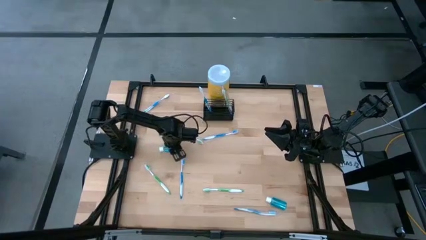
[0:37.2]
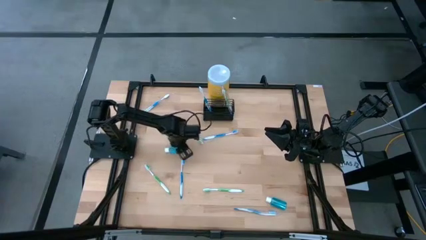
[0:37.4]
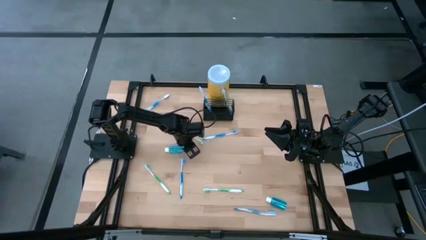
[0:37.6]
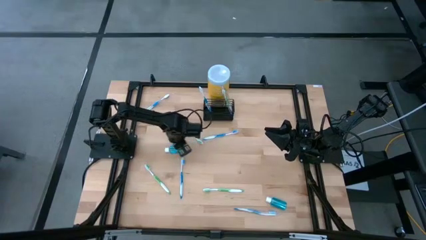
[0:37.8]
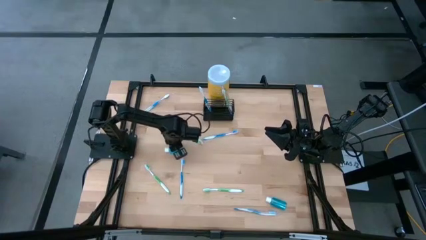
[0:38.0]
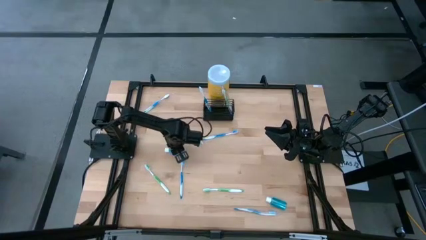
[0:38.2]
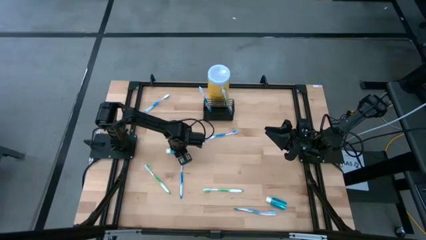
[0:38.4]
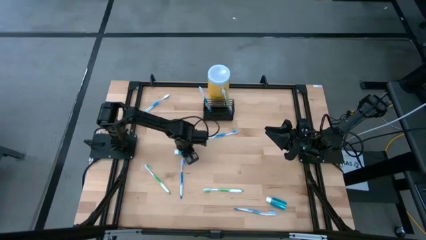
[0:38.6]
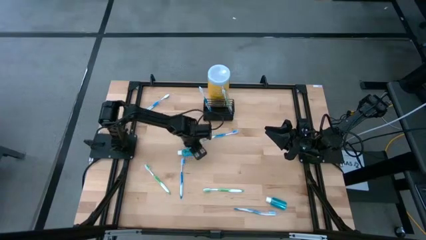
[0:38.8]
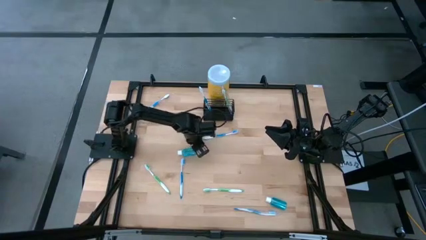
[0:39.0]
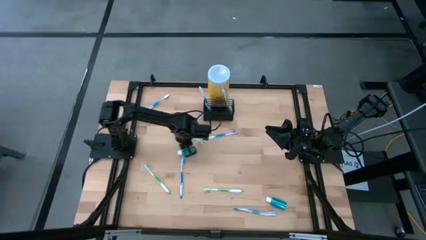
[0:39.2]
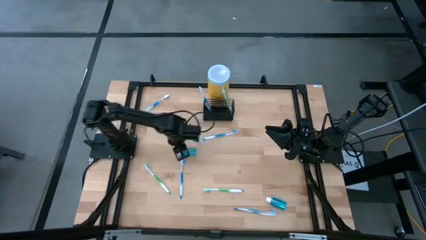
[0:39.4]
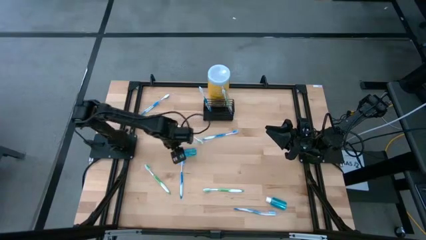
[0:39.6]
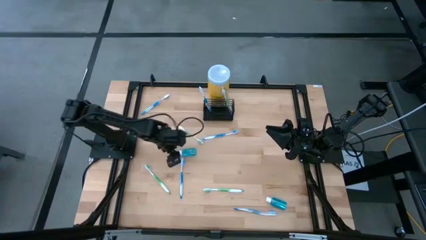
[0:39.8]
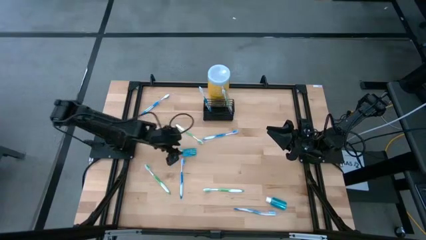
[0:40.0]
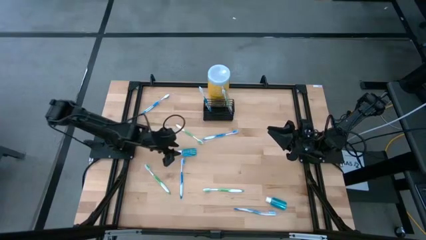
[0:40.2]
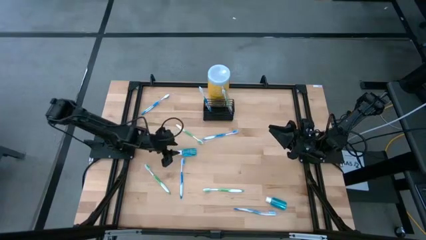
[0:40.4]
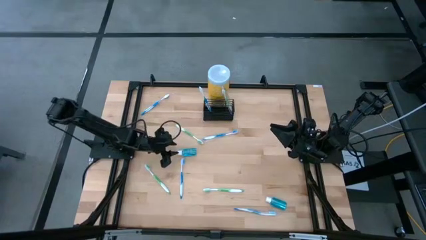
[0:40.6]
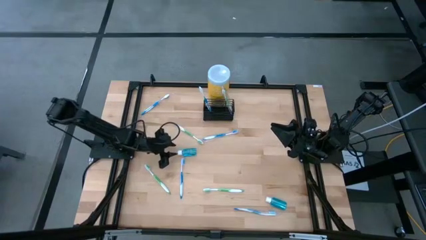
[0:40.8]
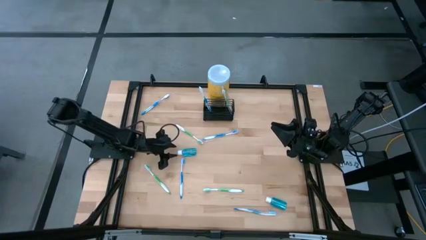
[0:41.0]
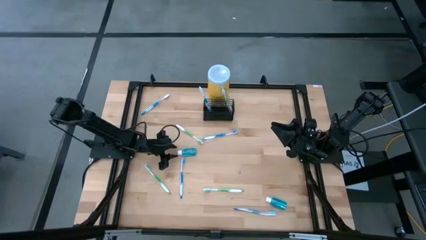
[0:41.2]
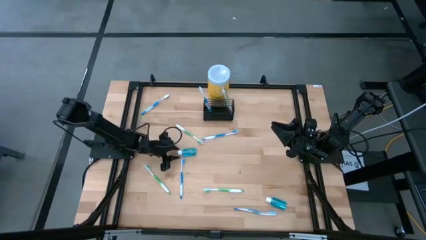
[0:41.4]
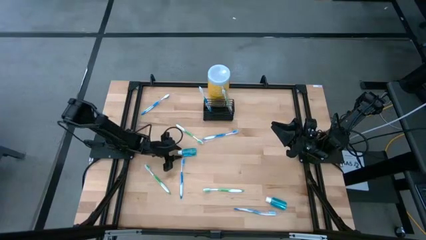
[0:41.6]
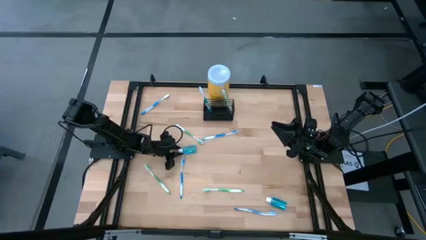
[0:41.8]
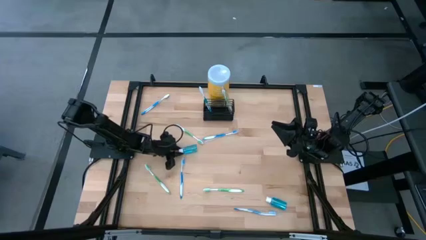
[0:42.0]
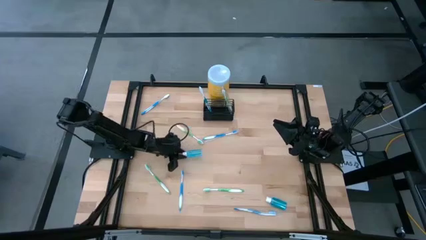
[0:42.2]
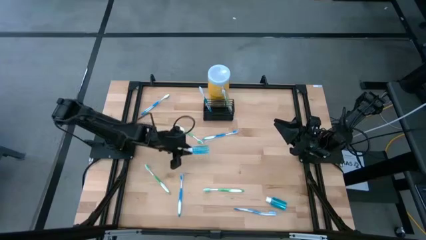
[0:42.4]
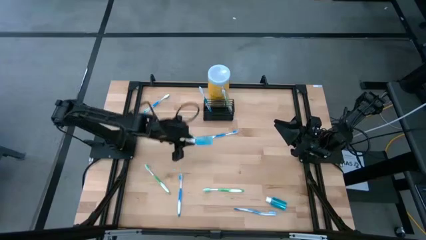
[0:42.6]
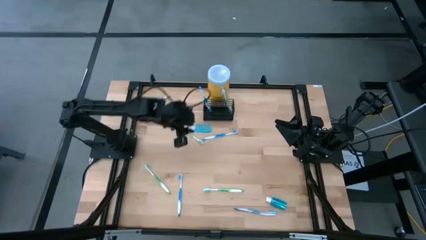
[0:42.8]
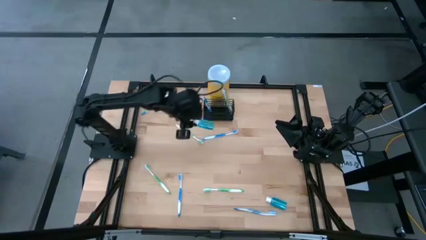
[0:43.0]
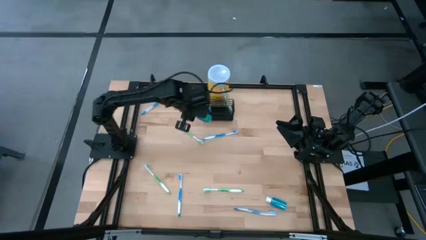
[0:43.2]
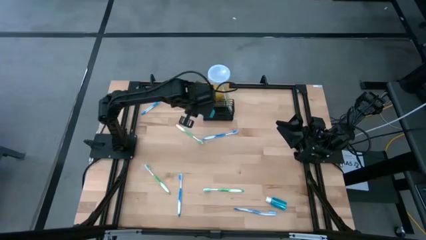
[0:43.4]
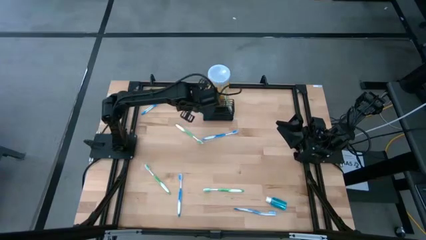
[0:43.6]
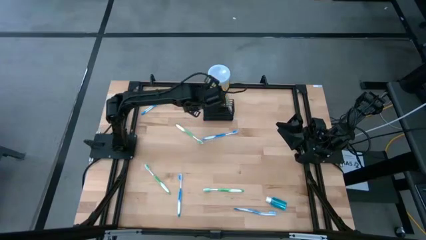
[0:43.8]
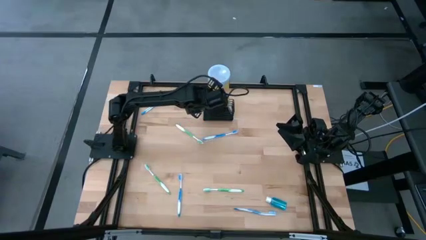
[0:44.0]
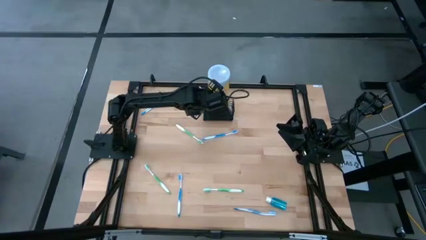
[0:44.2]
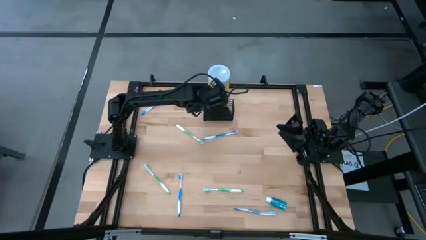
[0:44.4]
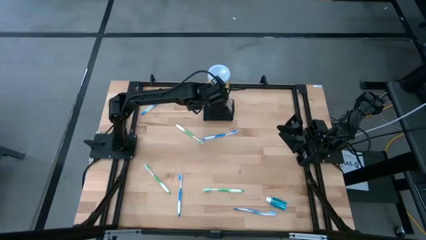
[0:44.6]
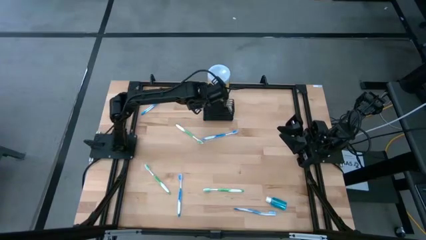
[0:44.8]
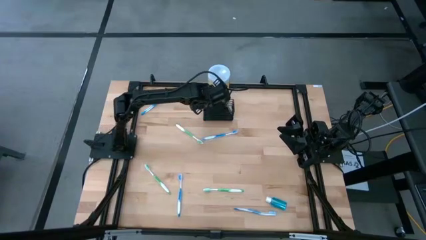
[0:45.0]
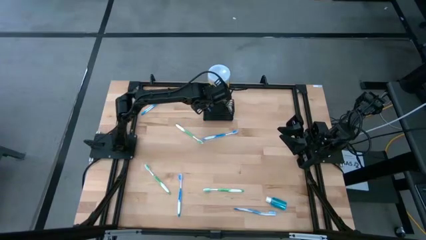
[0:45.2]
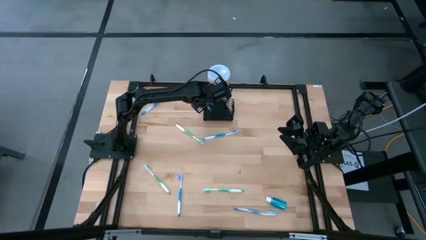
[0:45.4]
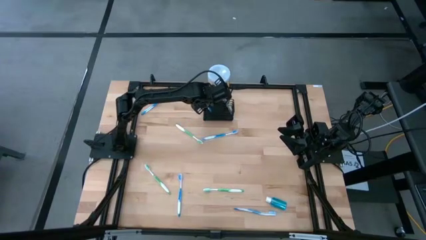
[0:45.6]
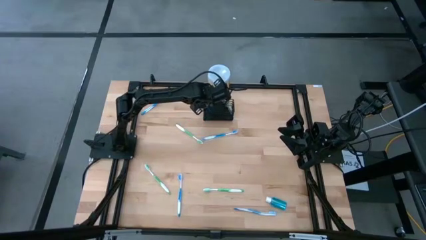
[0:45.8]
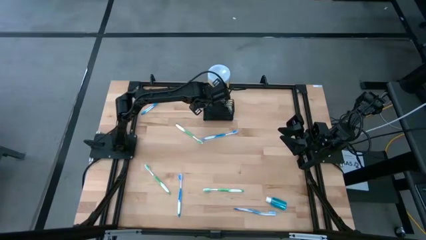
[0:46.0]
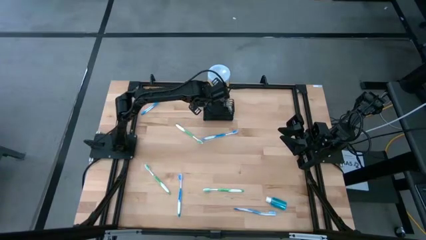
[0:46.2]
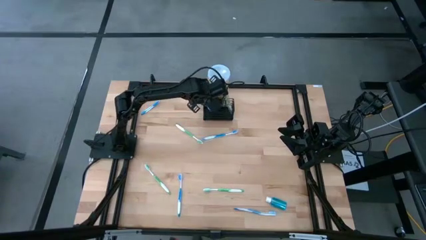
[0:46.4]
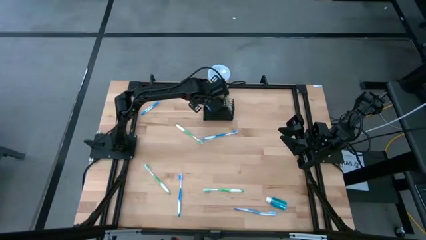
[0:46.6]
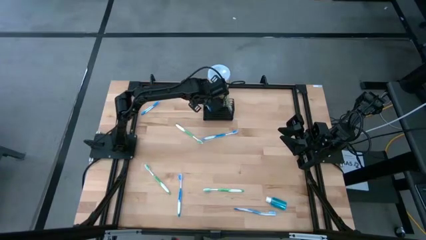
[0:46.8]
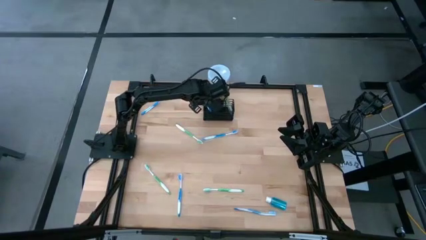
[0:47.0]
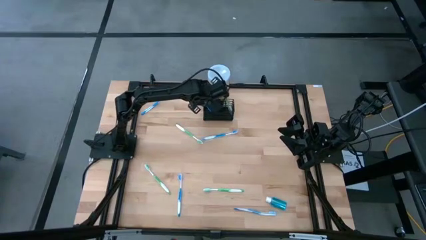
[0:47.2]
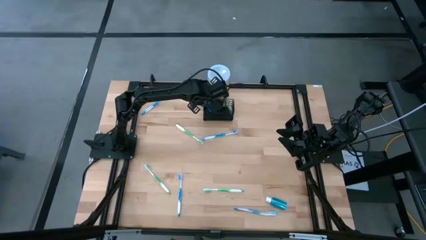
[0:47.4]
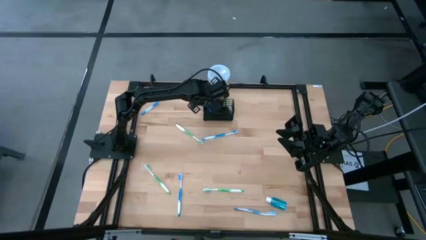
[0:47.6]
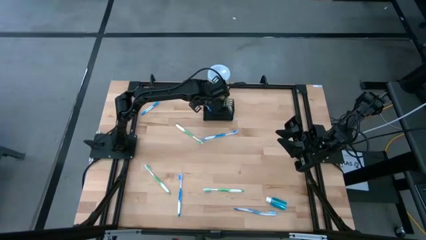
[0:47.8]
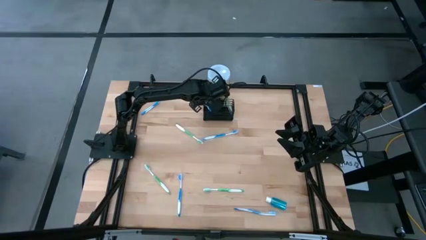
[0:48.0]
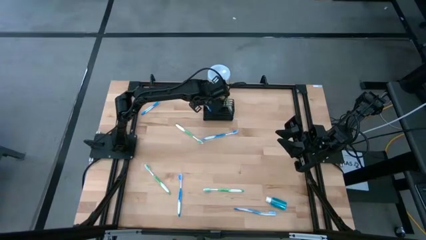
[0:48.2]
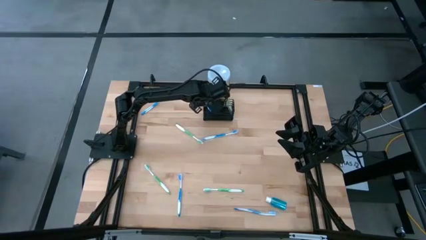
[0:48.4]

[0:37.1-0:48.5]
Task: Pick & Place toothbrushing station
Put the blue mouthwash in the wire organizer

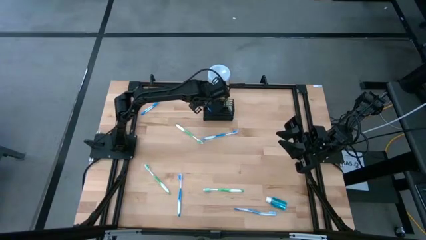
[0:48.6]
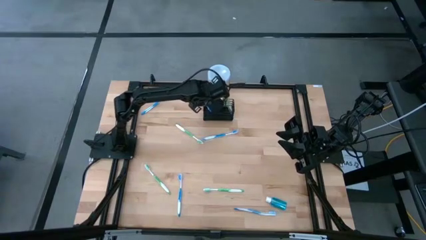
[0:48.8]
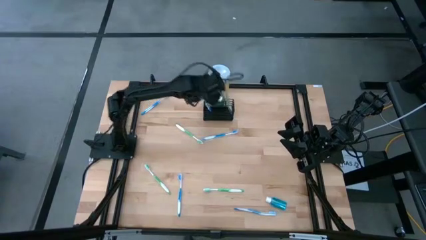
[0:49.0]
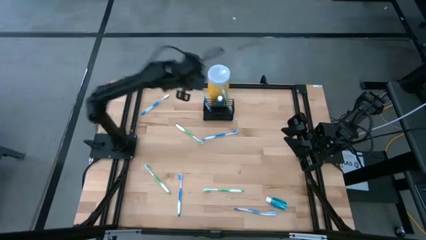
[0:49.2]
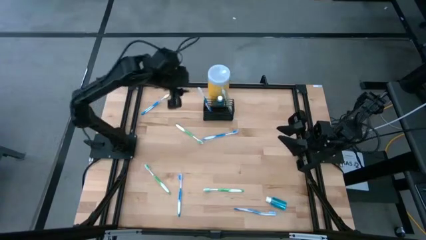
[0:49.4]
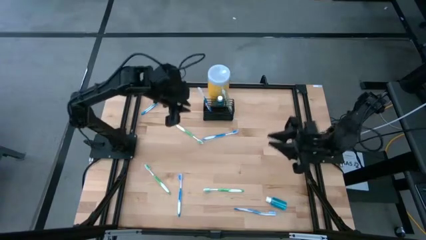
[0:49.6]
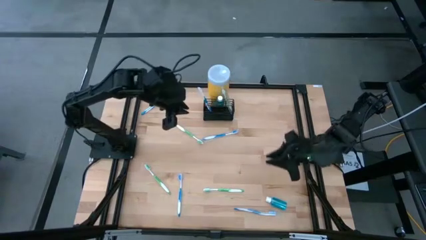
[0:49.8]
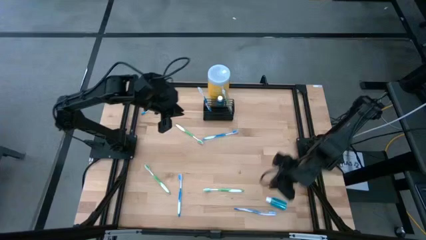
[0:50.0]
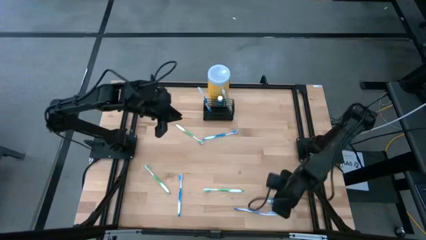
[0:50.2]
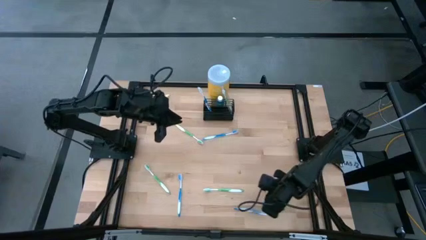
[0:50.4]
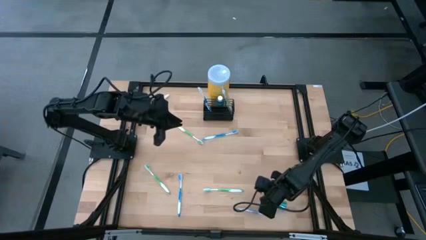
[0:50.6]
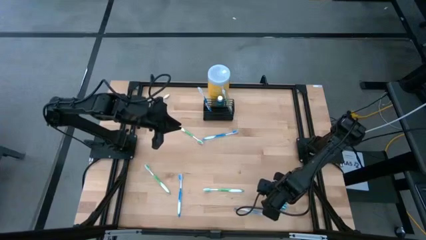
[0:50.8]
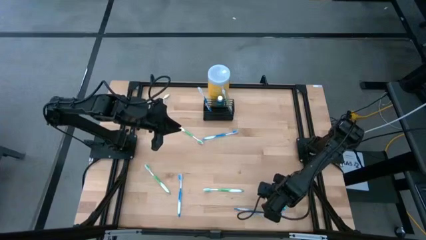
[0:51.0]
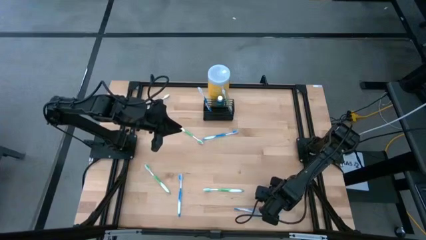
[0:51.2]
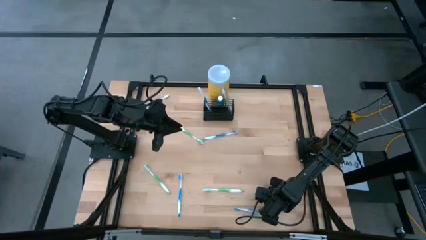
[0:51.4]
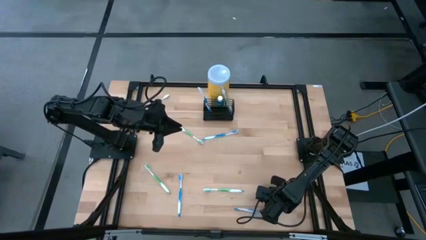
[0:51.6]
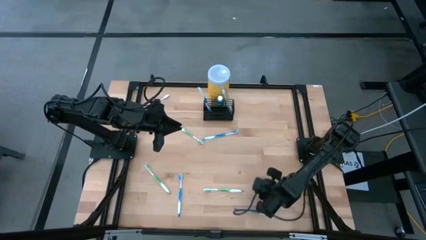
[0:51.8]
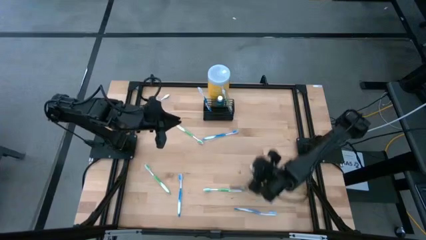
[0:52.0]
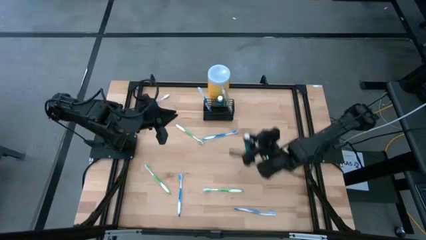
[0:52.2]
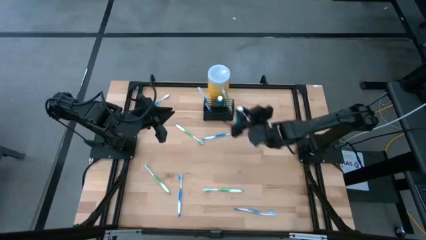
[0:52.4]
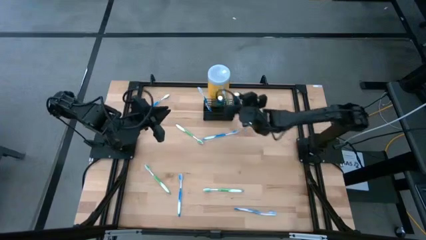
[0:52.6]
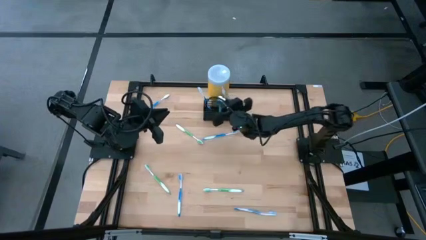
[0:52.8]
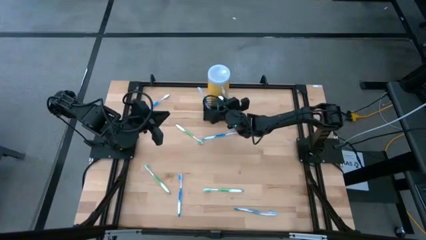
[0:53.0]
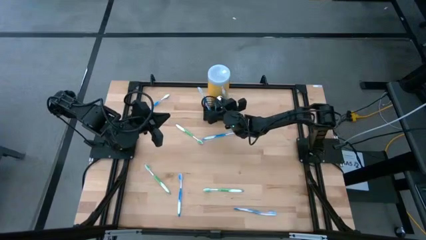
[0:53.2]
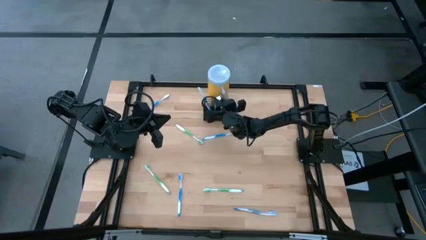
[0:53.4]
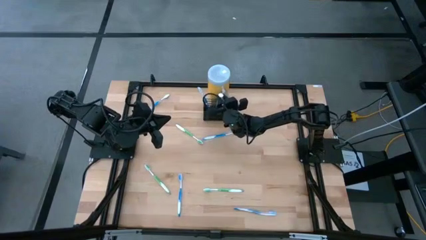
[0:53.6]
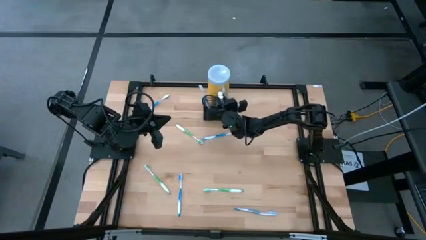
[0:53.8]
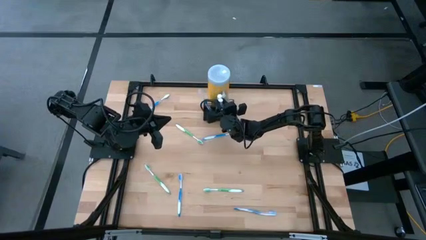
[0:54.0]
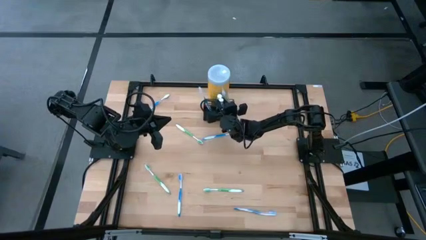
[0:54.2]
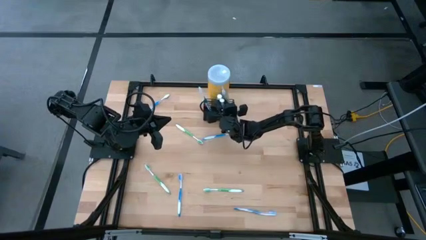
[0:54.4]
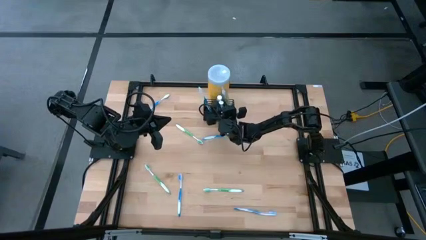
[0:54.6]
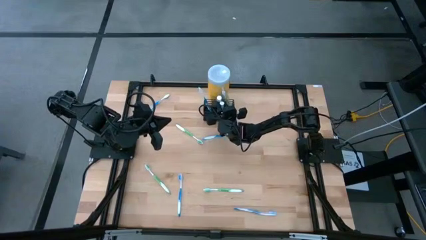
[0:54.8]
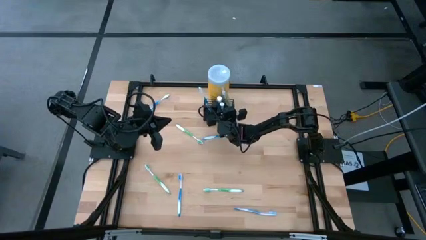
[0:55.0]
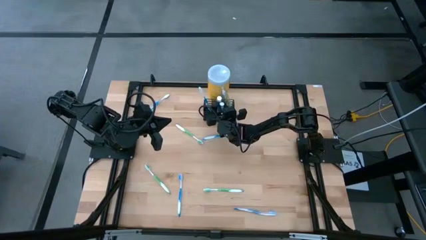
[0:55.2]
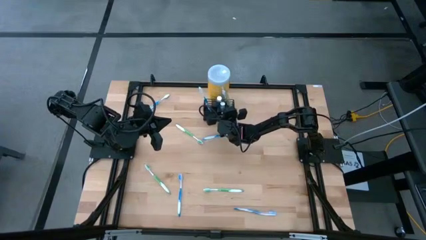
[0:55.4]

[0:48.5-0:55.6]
Put the blue mouthwash in the wire organizer
